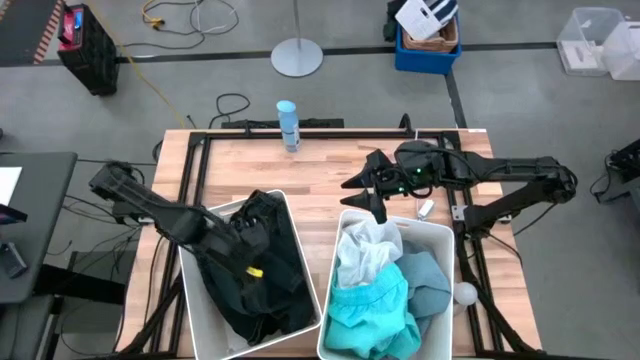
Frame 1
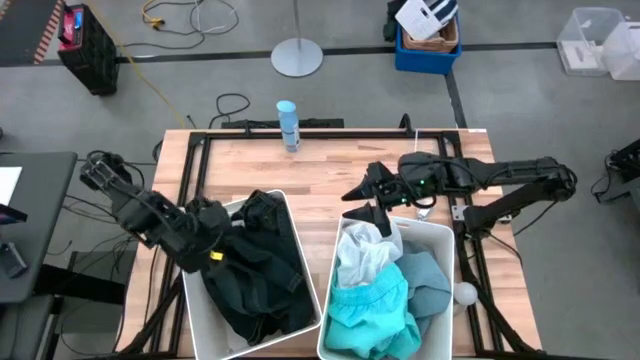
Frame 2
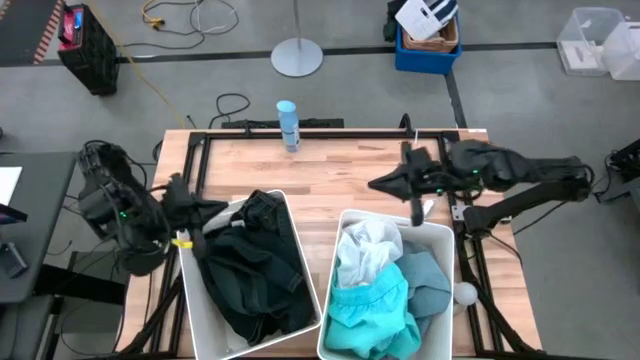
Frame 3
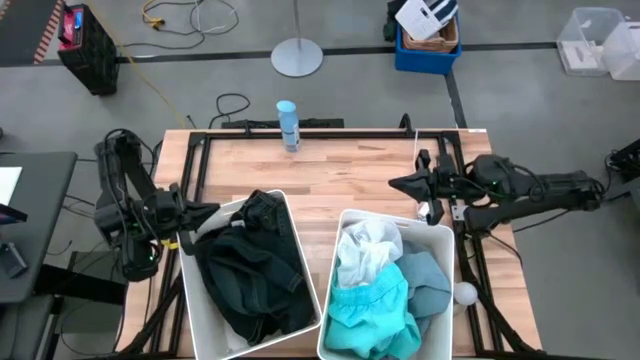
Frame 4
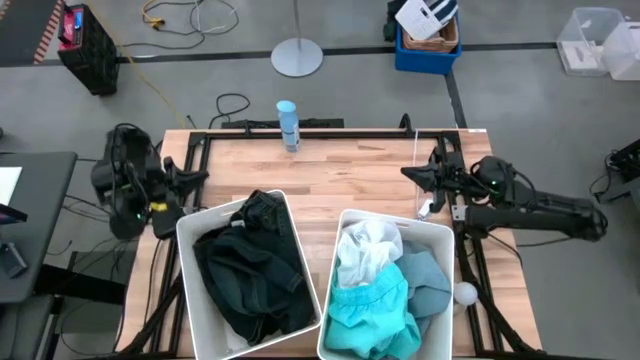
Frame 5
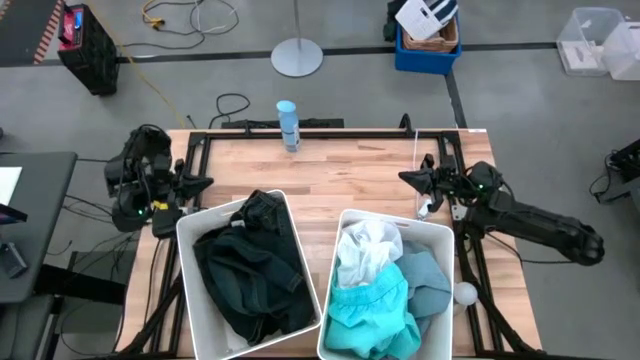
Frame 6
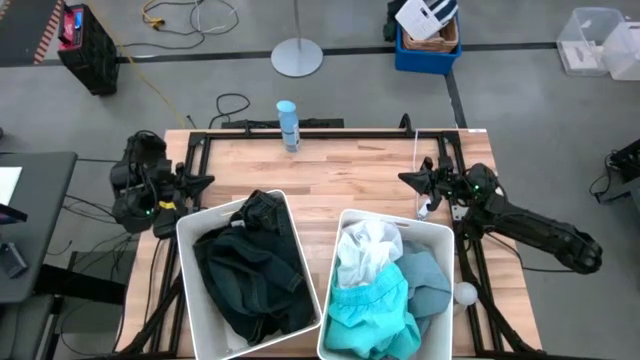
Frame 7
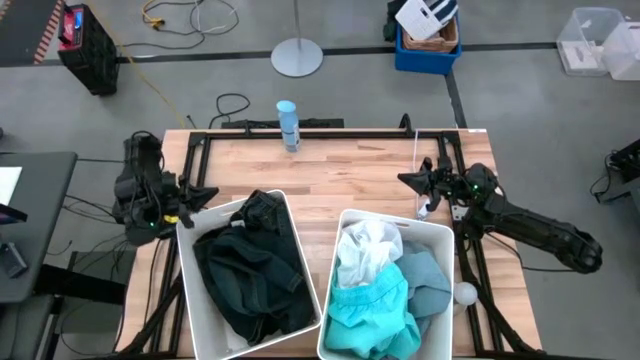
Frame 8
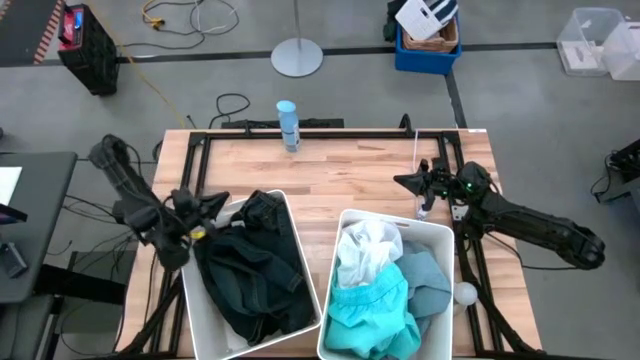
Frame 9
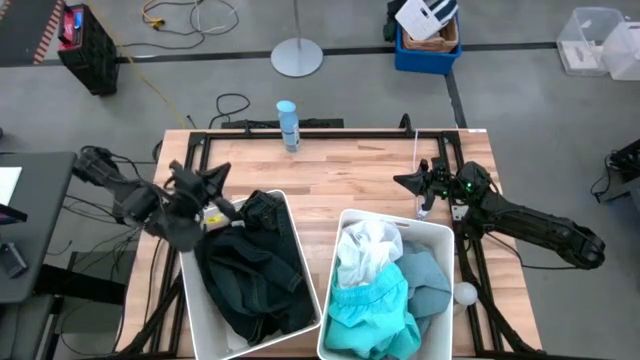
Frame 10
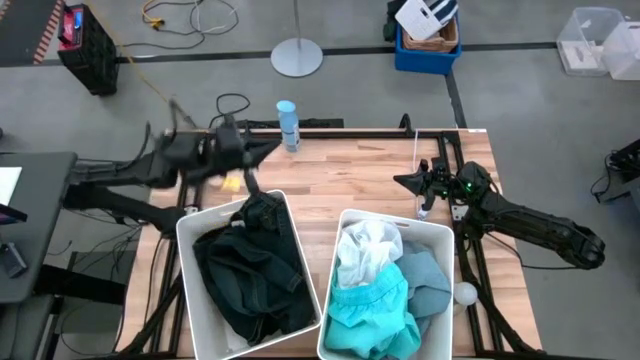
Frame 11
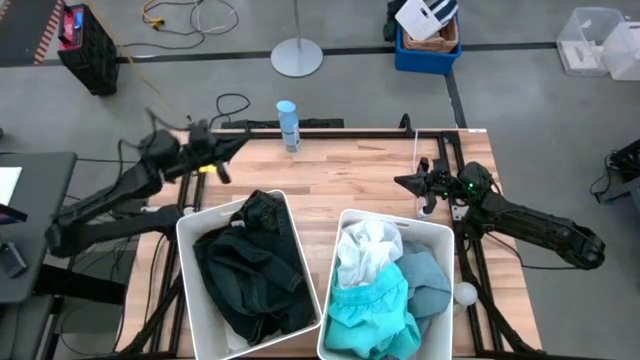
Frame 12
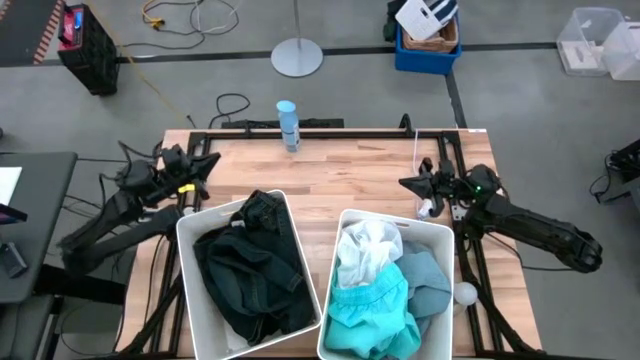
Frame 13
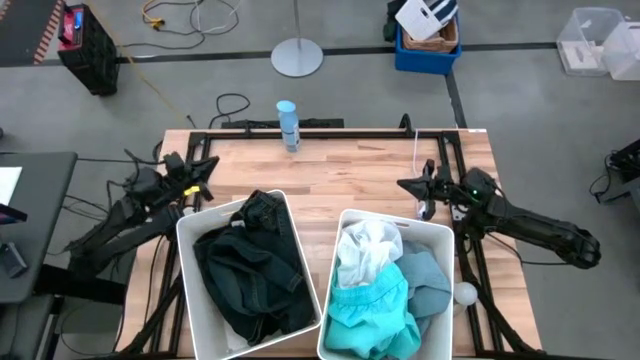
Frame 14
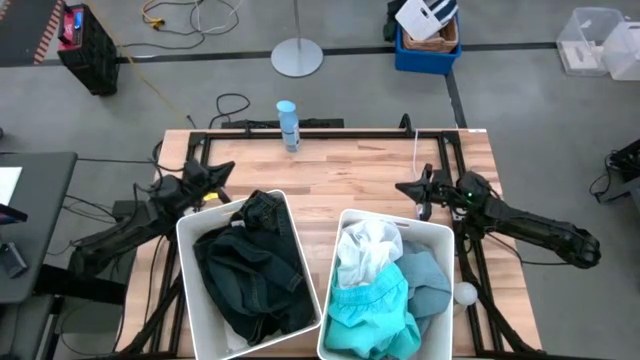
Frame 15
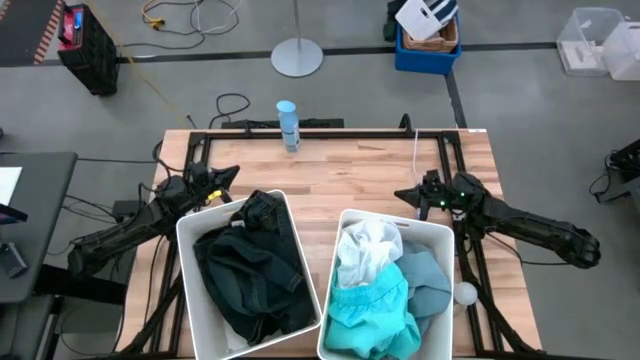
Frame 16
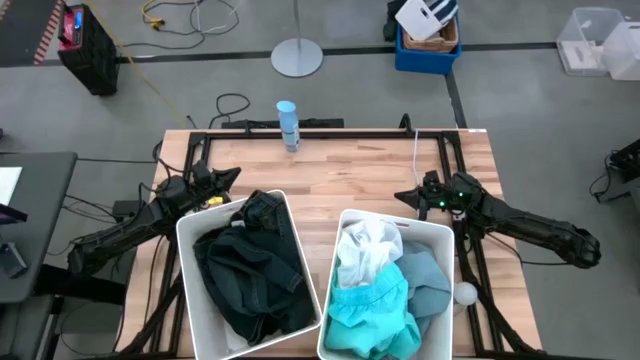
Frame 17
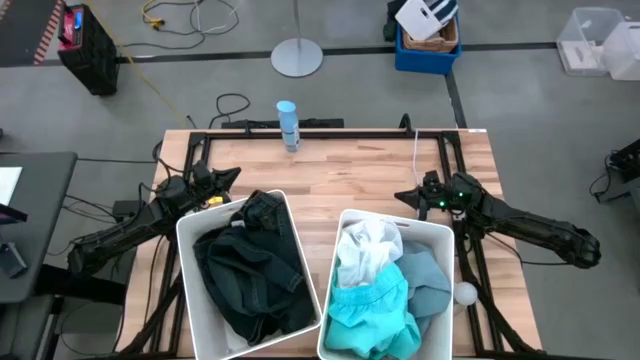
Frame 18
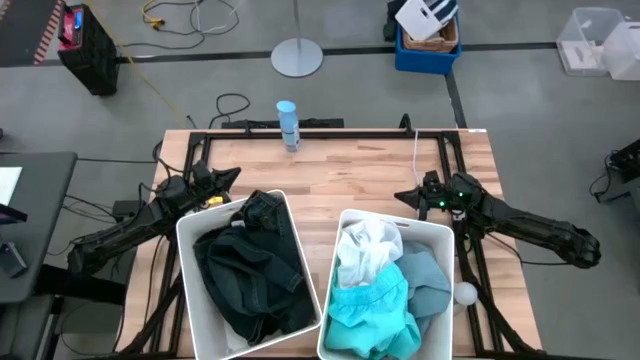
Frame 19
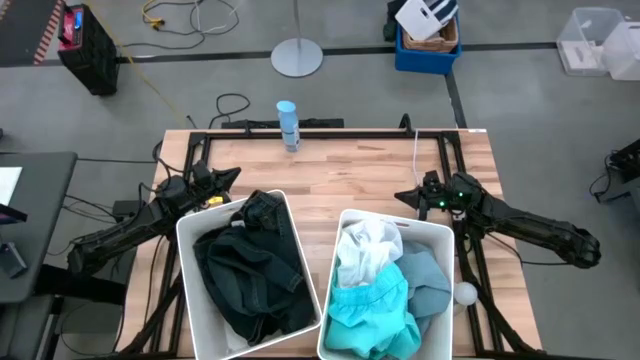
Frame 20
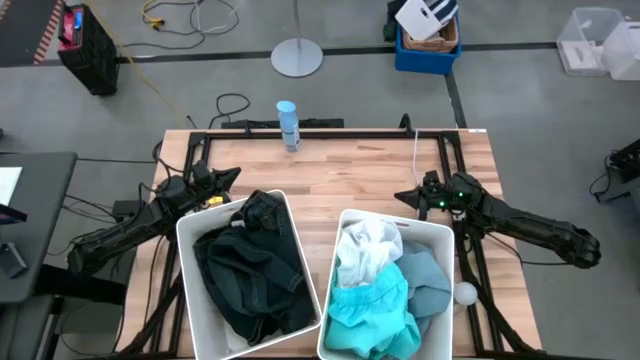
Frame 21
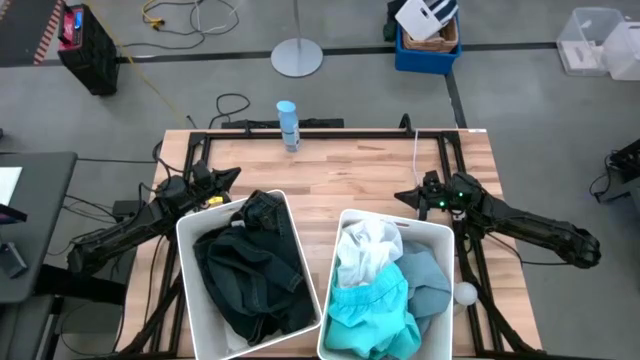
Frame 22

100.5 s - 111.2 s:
Task: Sort clothes
Return to Home Position

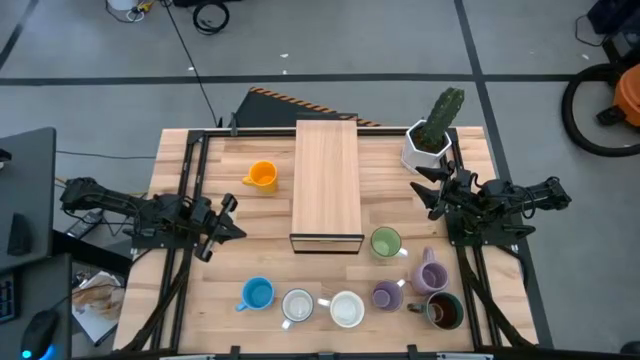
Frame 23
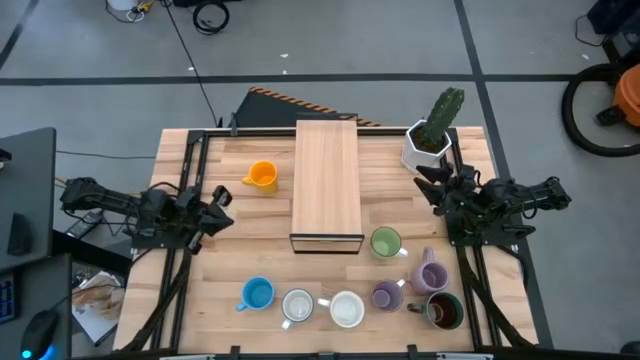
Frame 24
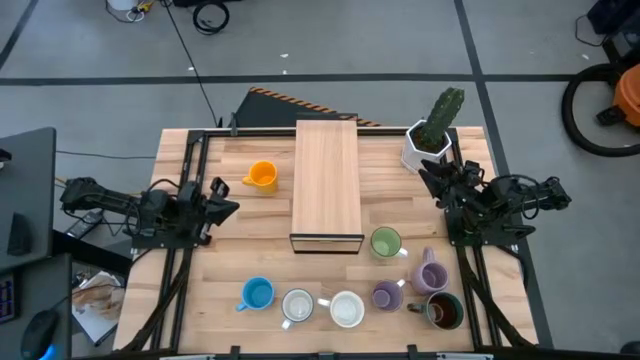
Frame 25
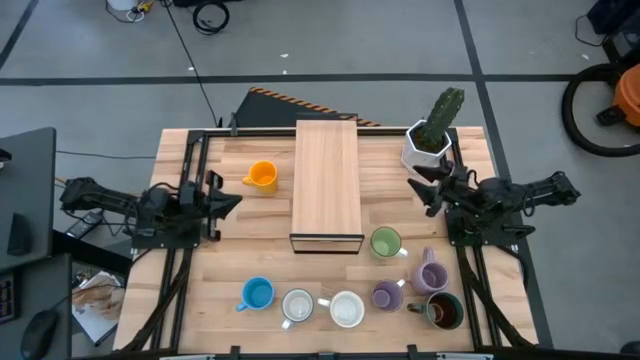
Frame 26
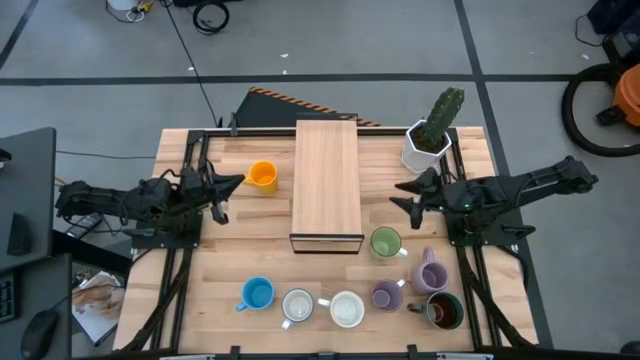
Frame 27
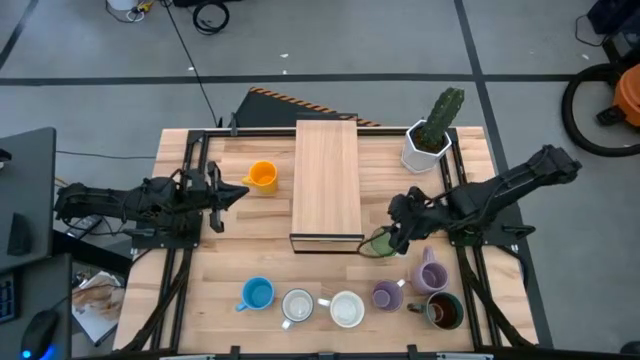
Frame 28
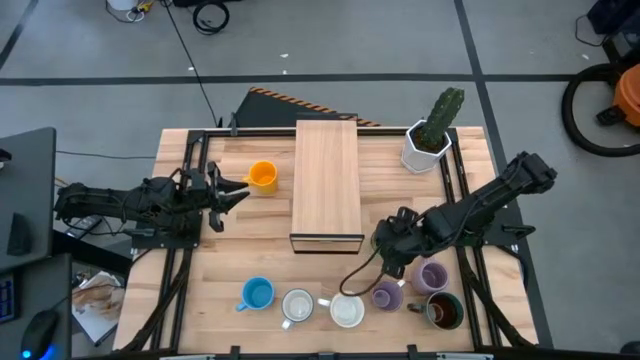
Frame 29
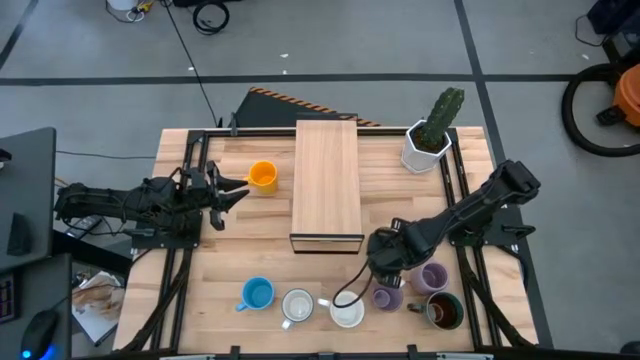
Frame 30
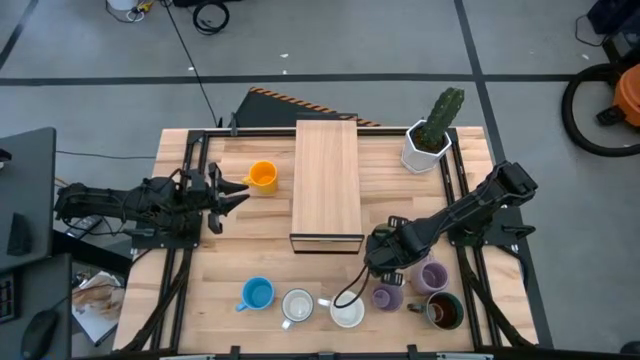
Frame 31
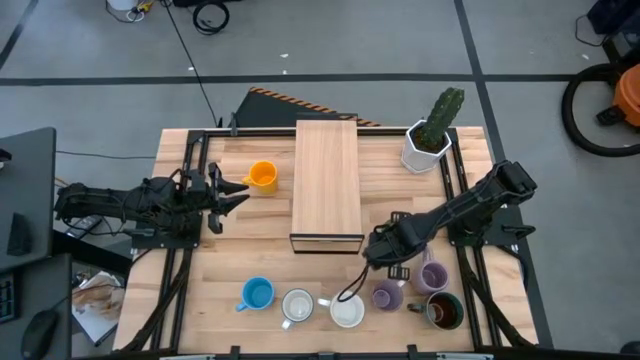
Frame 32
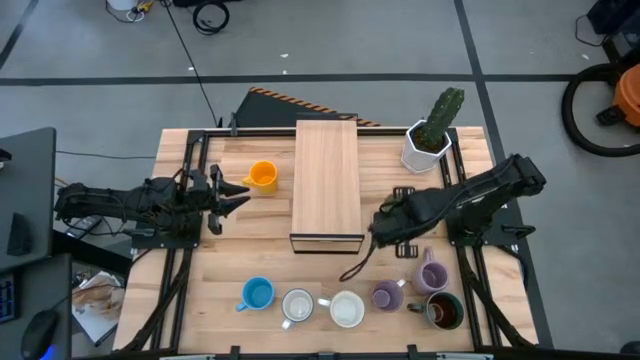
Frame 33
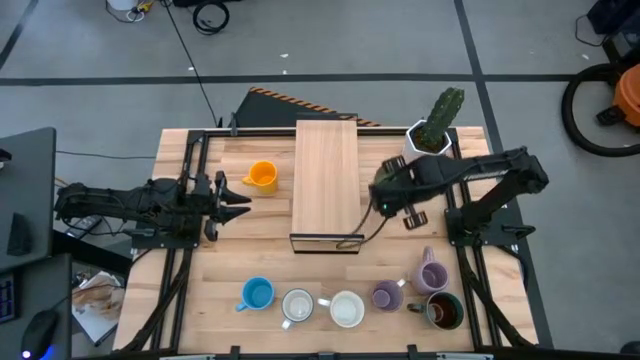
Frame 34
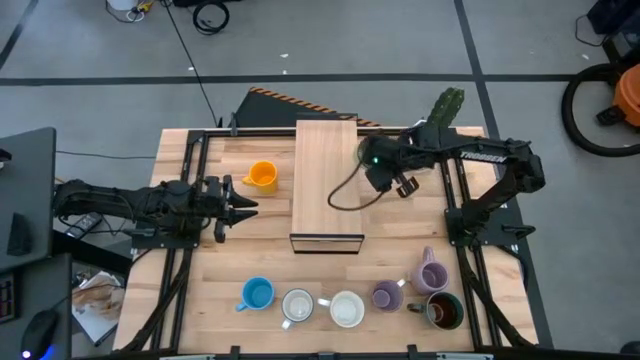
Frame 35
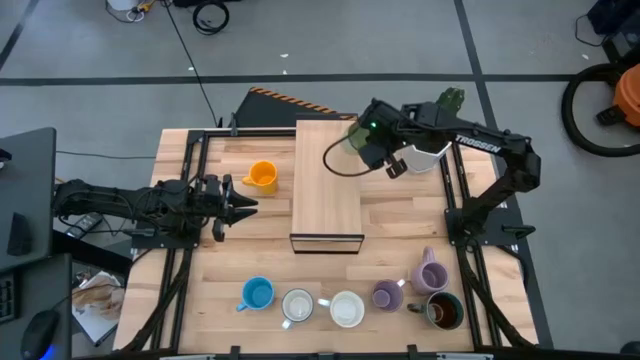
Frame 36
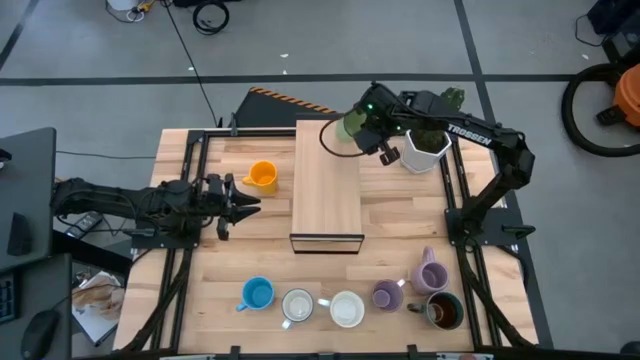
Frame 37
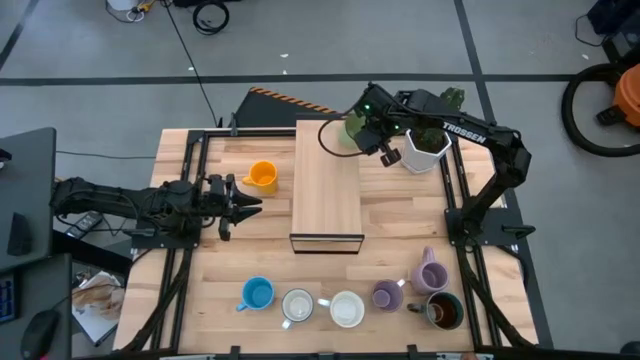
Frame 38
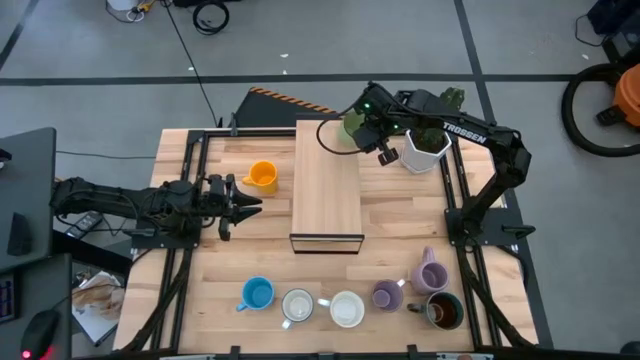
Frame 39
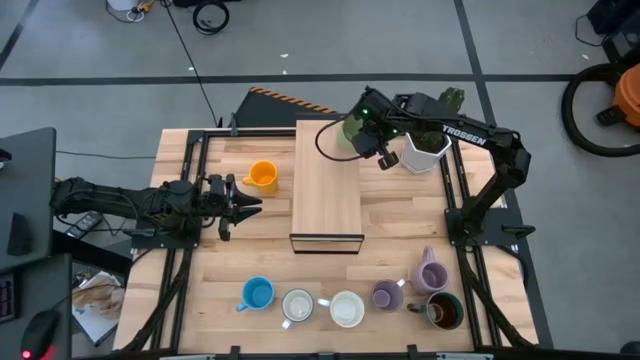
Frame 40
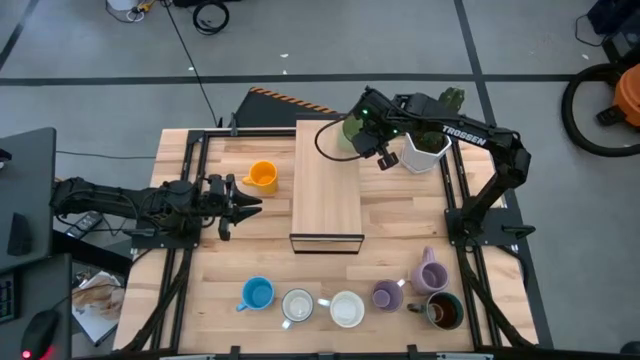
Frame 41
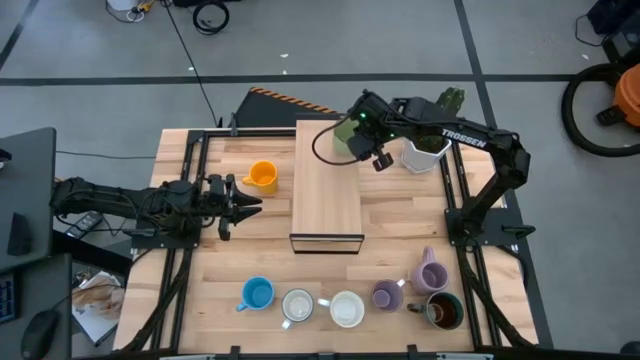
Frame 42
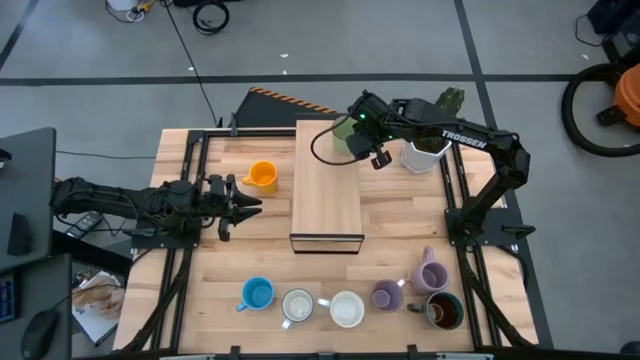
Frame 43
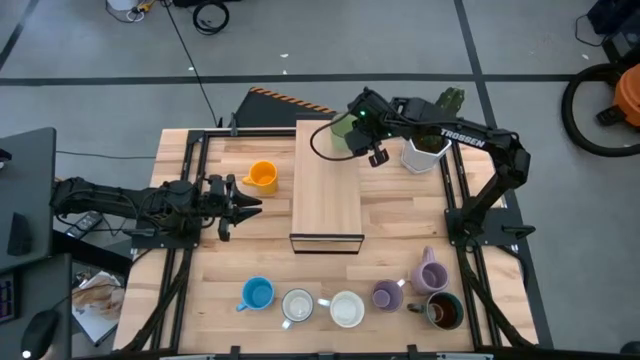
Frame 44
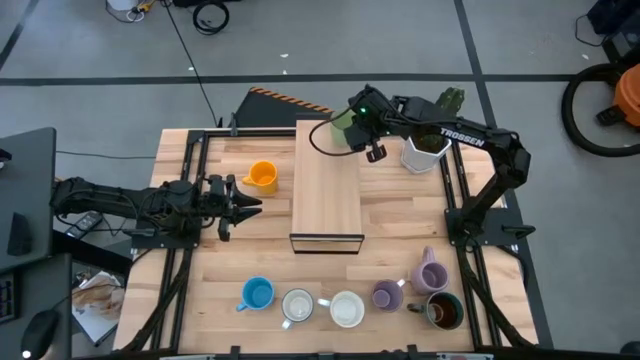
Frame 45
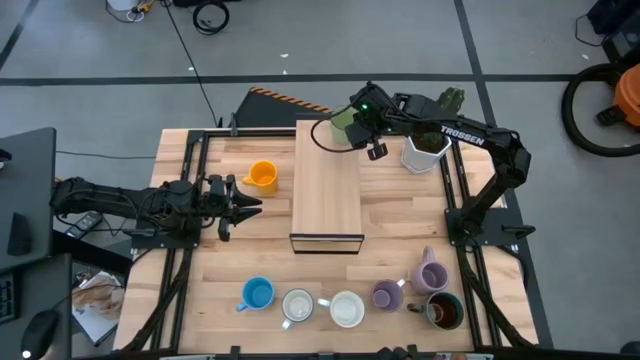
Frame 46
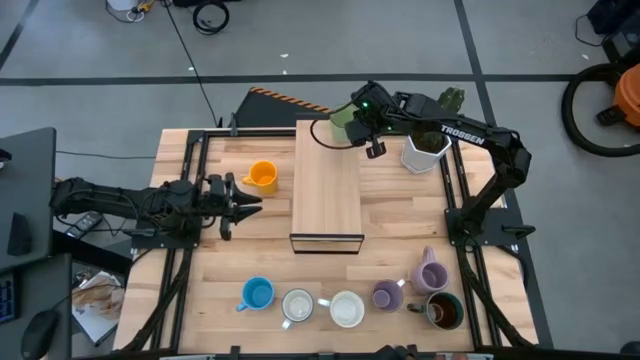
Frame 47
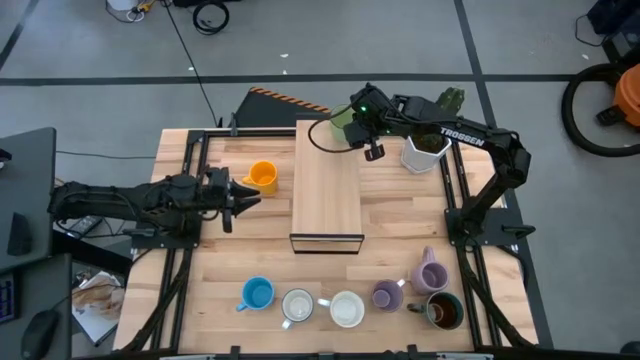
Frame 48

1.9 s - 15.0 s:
Task: Place coffee mugs
Put the green mug on the shelf
